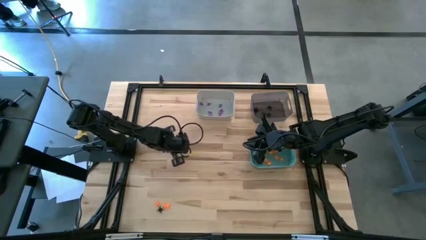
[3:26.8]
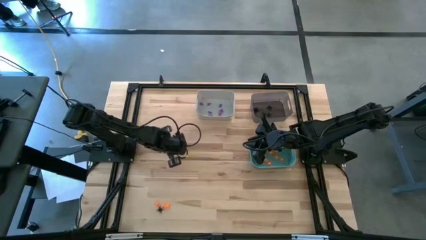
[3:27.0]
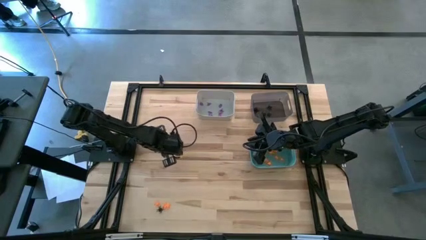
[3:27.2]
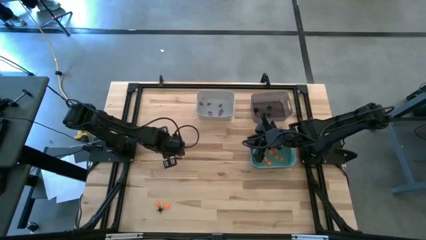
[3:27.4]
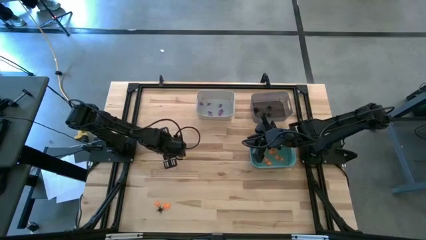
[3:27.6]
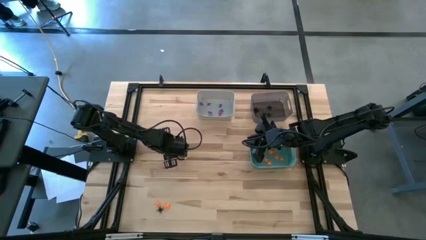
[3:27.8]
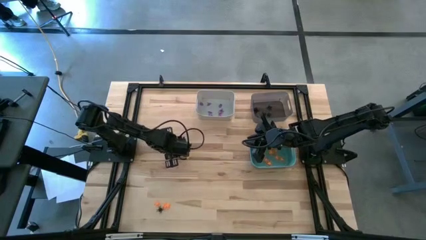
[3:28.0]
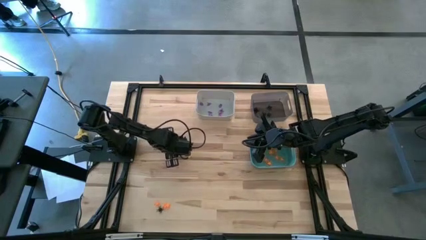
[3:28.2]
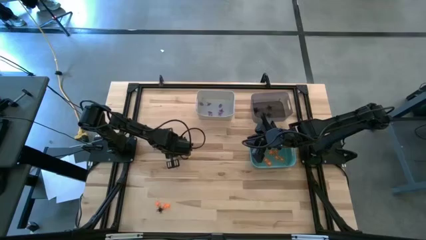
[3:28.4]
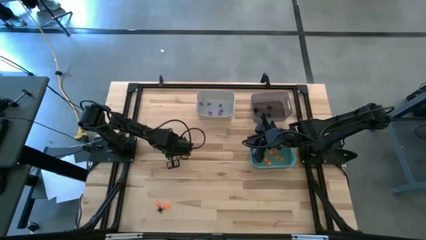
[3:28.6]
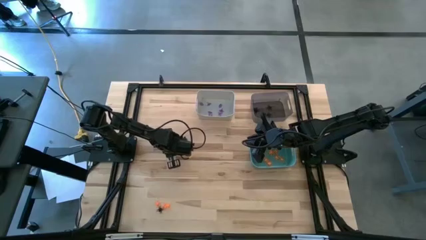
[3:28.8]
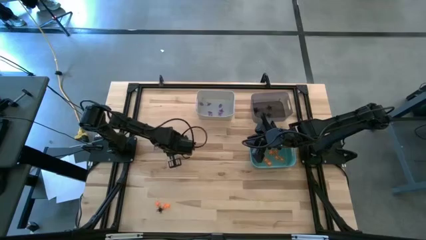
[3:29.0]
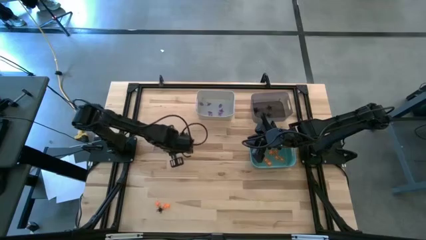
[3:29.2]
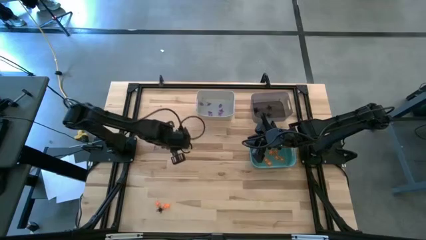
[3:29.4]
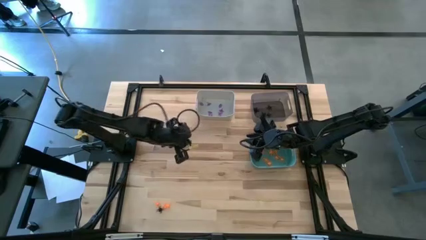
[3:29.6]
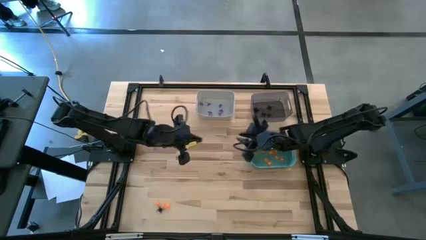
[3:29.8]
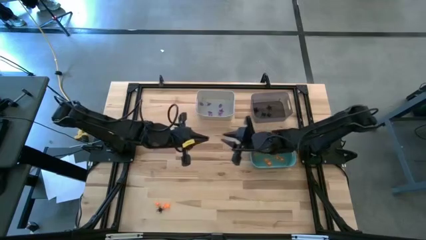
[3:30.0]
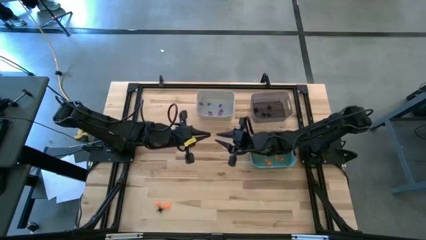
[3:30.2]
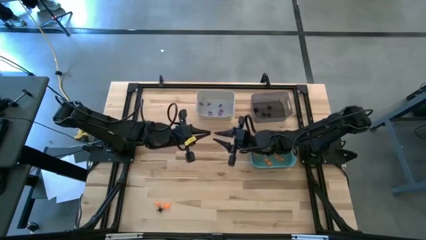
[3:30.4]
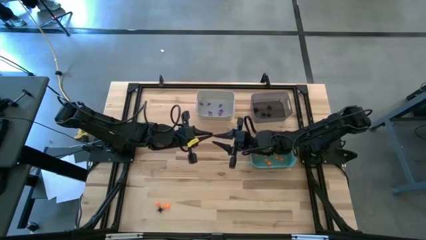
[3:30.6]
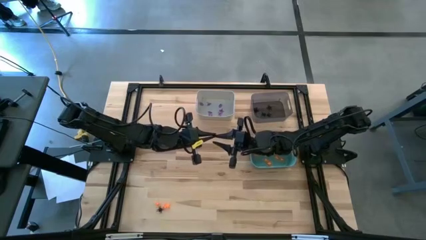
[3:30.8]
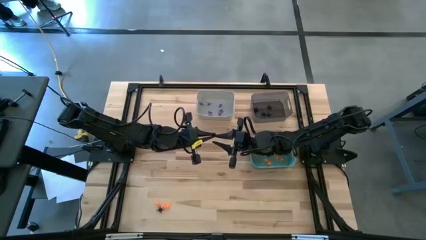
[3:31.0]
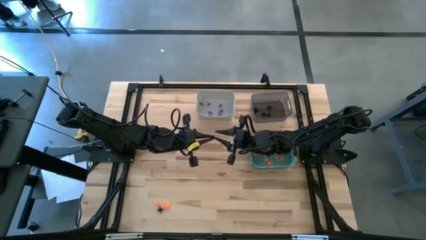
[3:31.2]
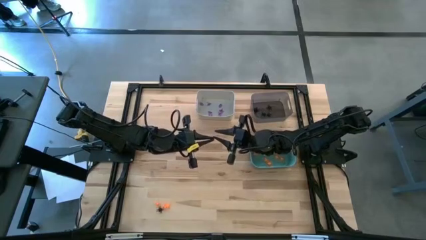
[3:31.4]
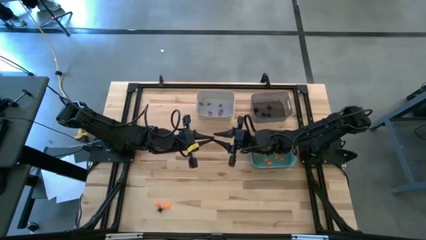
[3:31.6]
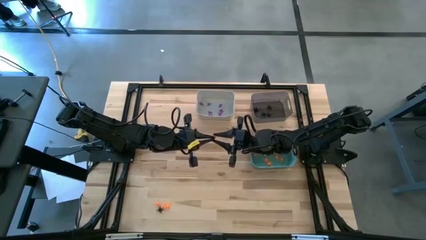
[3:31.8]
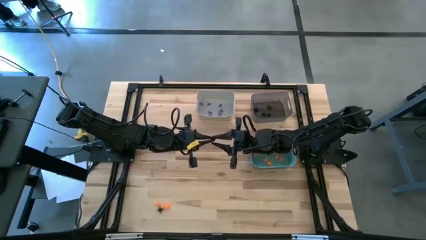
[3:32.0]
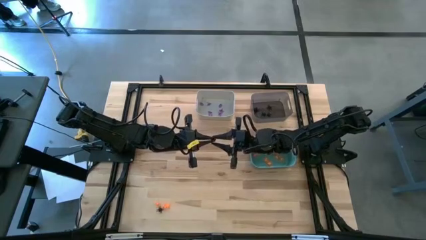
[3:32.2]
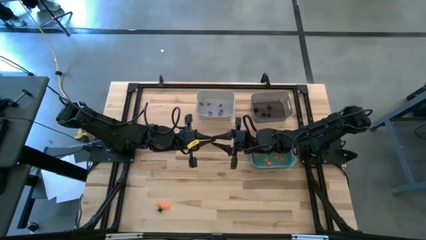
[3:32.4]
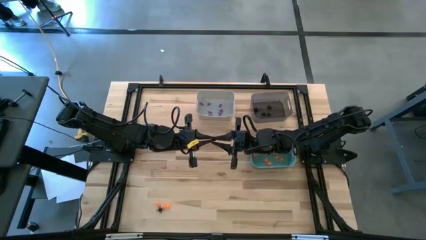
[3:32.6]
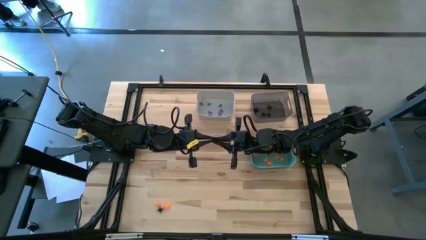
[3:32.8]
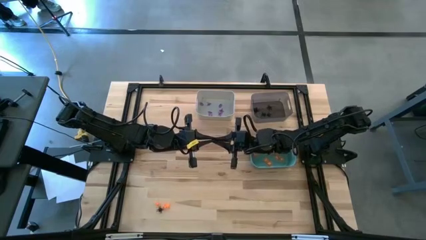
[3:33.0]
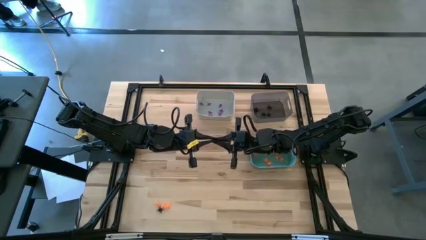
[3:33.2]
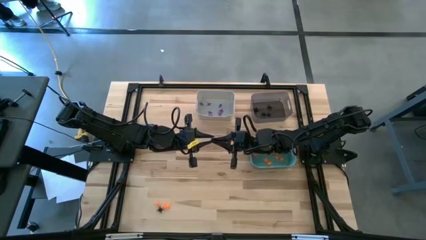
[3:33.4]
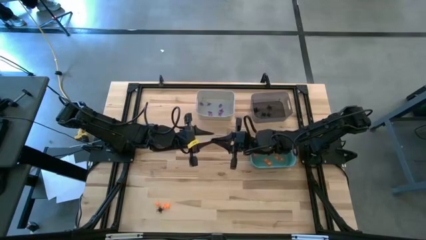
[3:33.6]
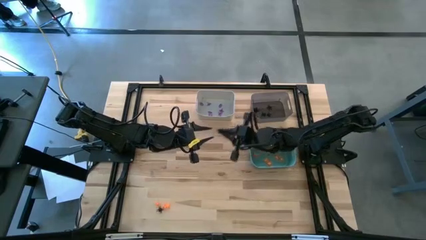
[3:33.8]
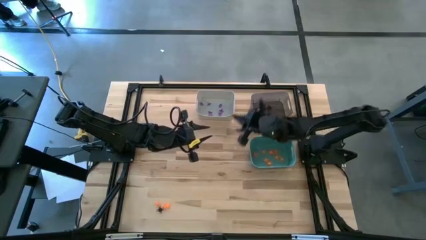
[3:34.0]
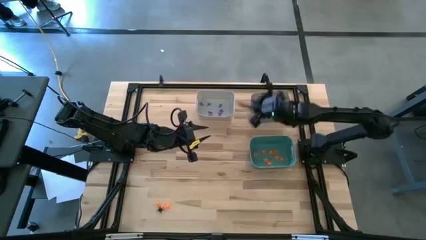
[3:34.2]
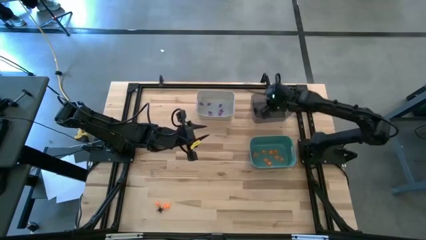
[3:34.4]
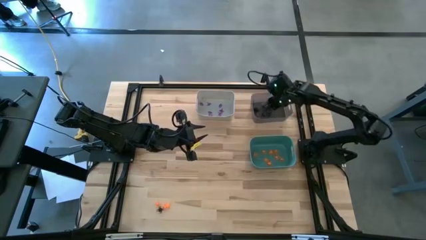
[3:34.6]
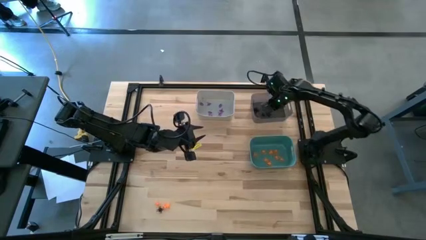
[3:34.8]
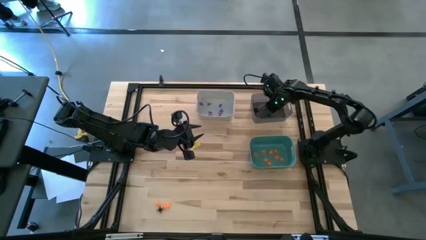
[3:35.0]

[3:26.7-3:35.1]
Task: Sort Halloween decoration
Put the black spider toy into the black bin

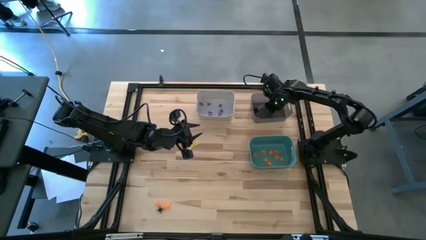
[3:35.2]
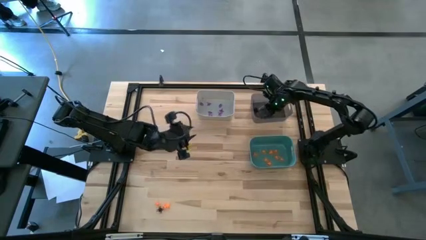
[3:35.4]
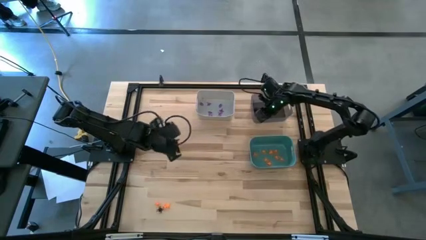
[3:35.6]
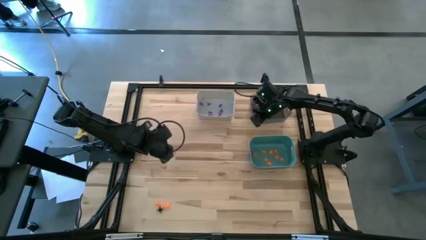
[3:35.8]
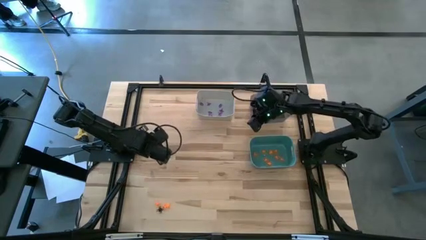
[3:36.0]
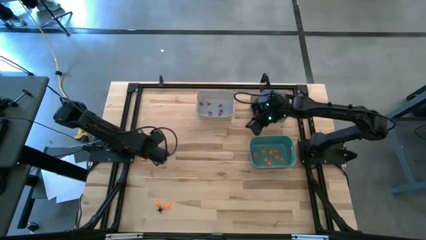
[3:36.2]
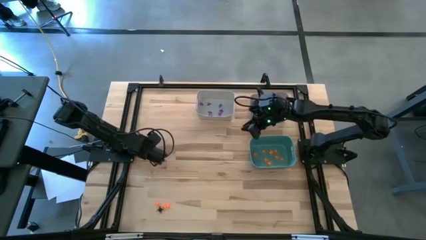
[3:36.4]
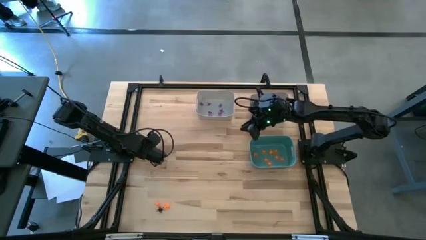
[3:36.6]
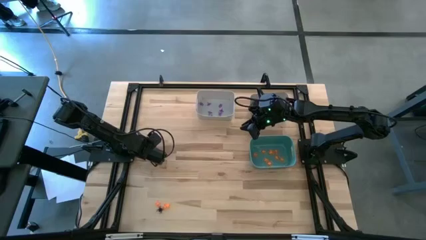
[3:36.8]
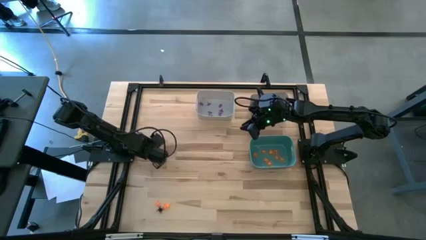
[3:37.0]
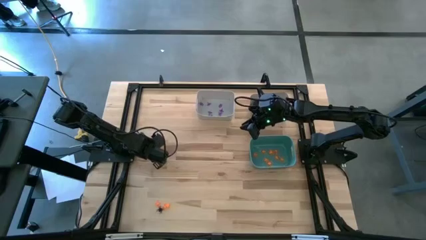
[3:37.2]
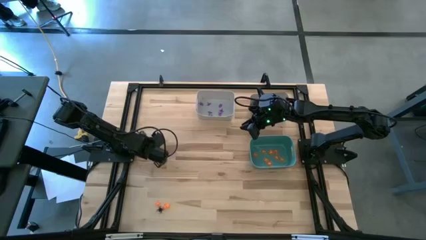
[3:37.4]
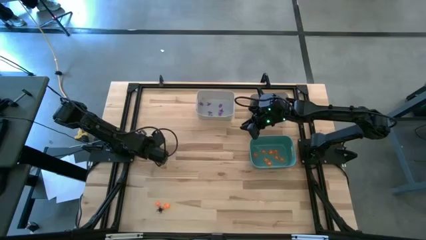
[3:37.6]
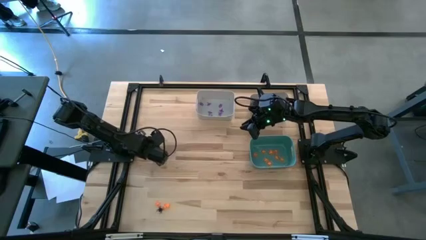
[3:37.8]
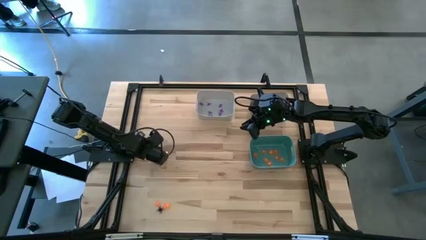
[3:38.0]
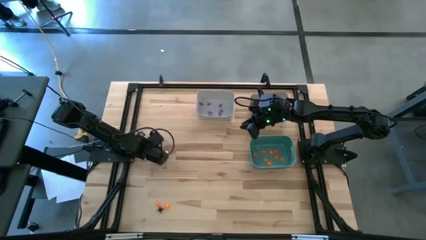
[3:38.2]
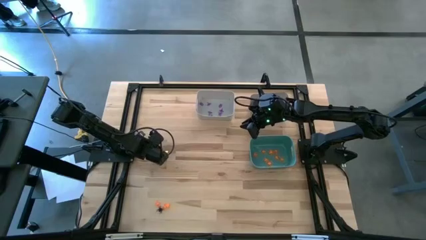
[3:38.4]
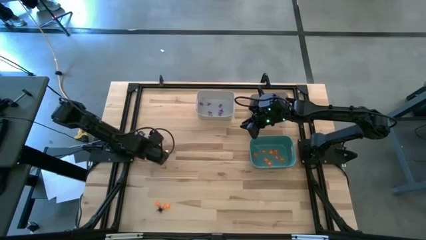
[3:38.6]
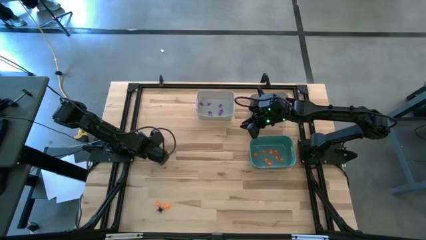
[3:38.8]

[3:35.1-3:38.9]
Put the purple witch hat toy into the white bin

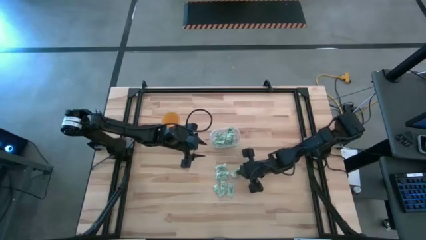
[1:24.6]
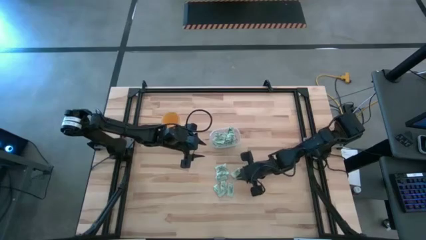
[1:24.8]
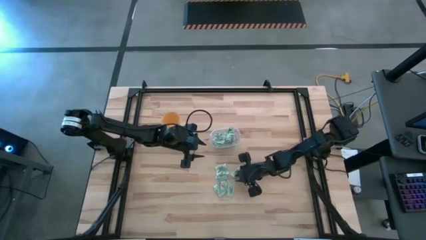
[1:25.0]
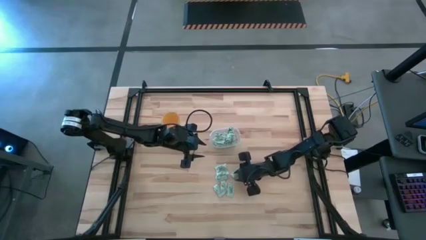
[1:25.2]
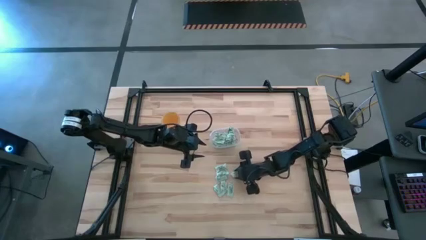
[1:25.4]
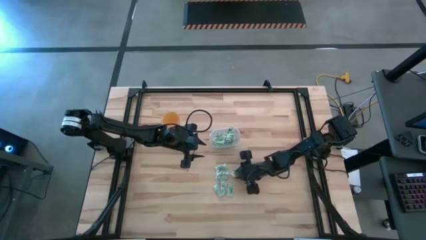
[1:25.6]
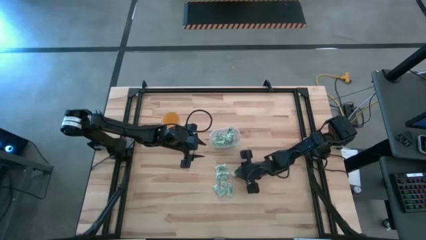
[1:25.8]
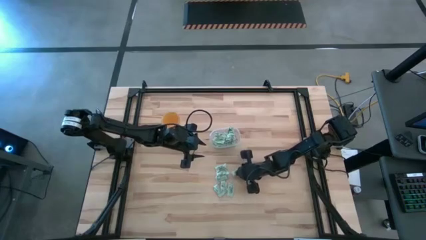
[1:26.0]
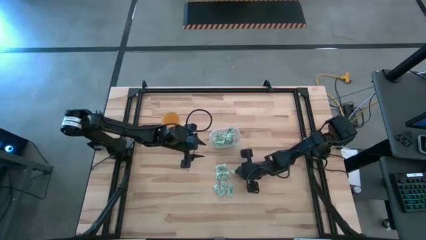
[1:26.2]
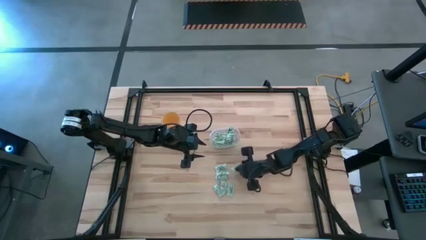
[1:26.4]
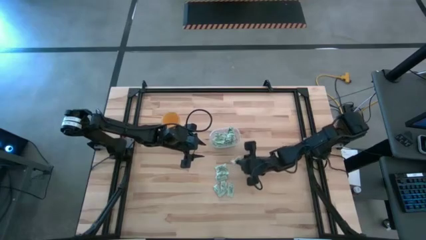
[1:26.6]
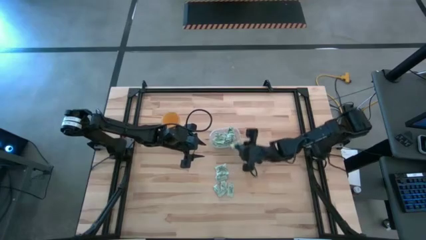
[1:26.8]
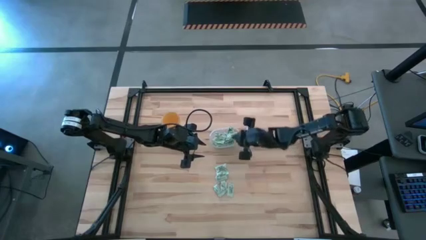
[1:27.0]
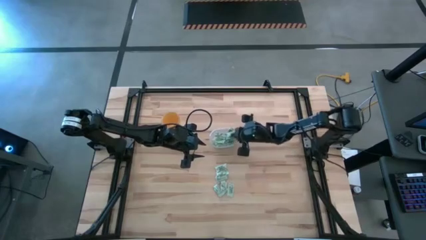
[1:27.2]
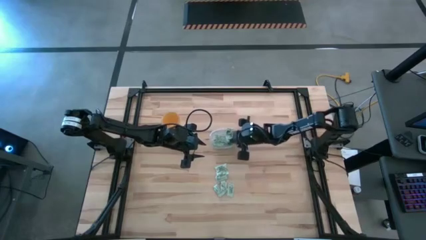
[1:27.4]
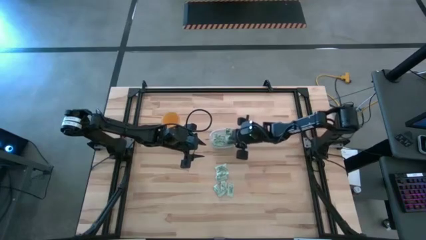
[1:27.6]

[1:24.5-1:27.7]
Task: Pick and place Stevia / Truvia into bins
Put the stevia packet into the transparent bin
